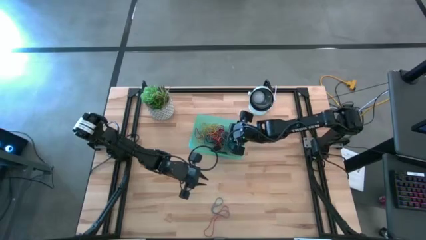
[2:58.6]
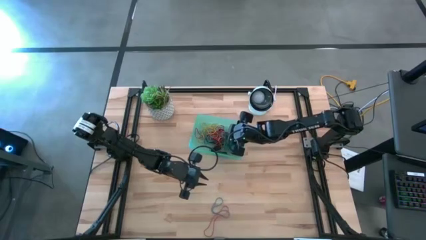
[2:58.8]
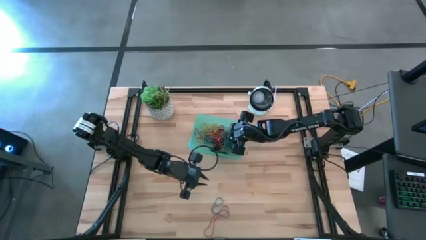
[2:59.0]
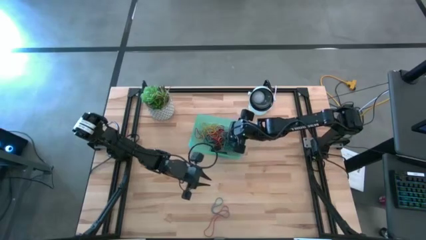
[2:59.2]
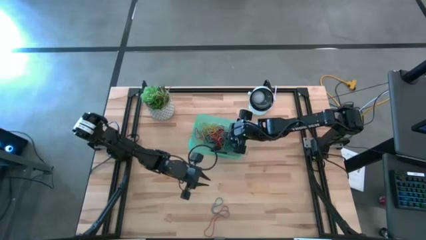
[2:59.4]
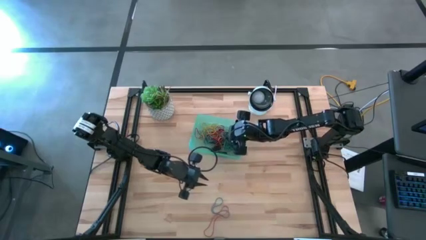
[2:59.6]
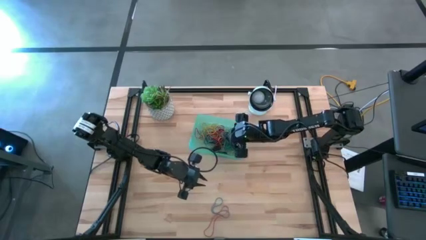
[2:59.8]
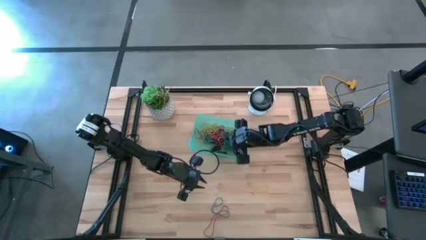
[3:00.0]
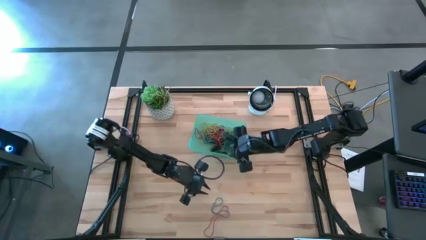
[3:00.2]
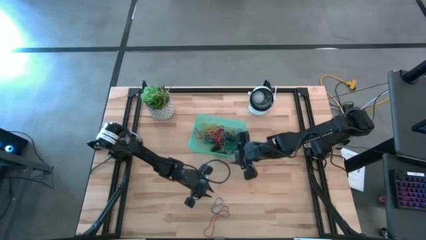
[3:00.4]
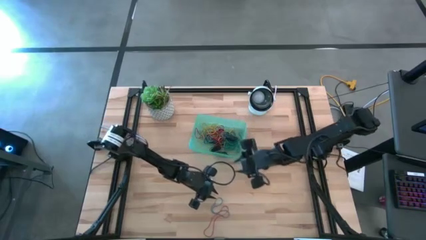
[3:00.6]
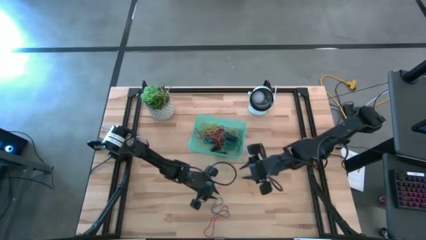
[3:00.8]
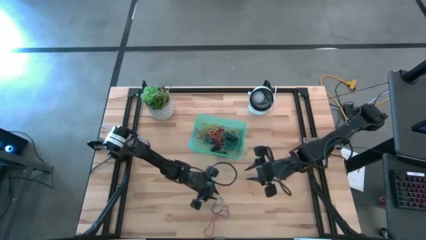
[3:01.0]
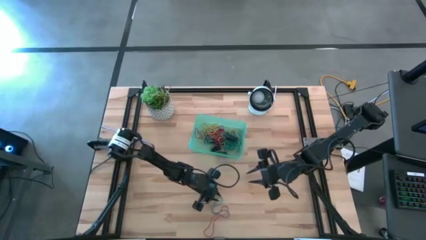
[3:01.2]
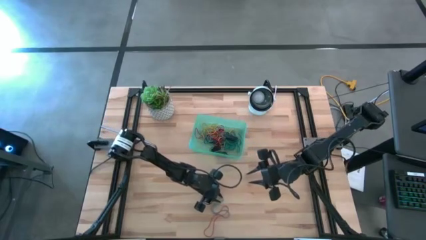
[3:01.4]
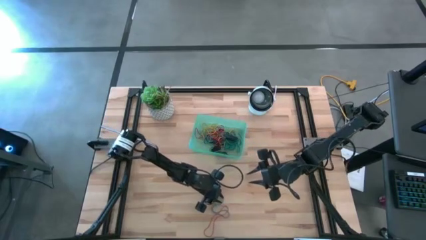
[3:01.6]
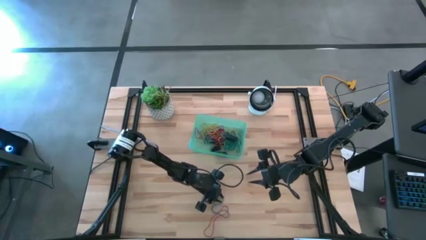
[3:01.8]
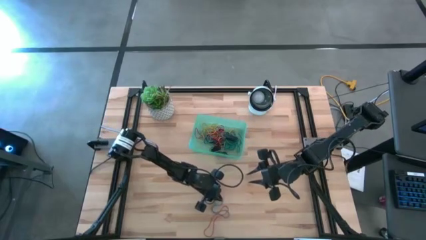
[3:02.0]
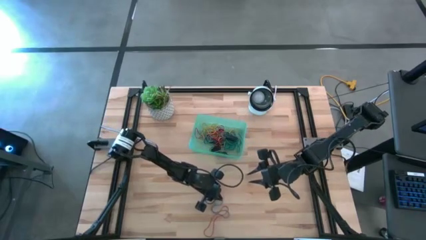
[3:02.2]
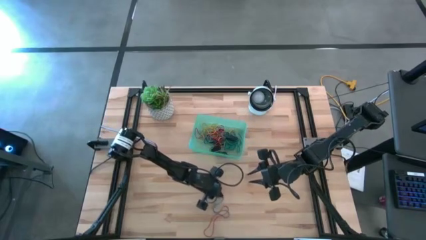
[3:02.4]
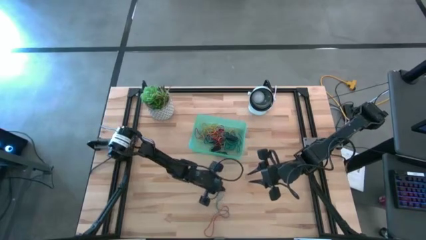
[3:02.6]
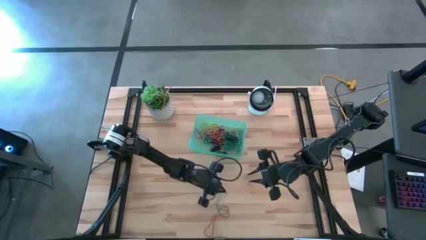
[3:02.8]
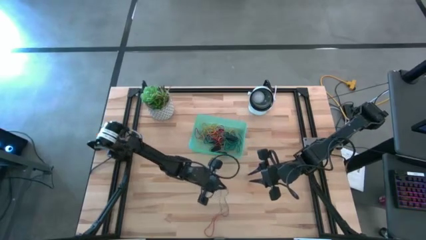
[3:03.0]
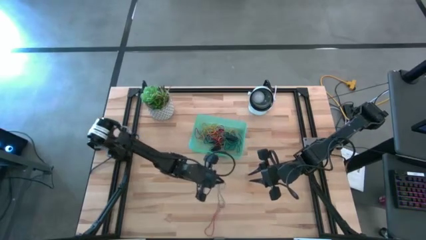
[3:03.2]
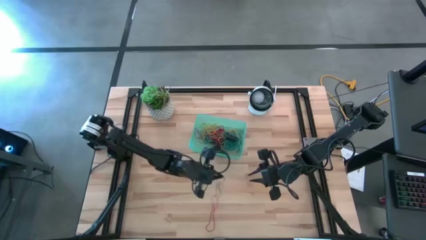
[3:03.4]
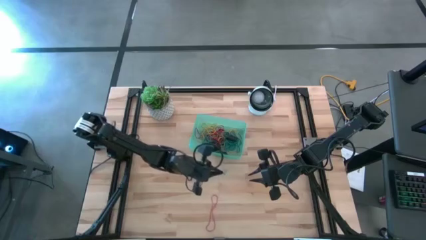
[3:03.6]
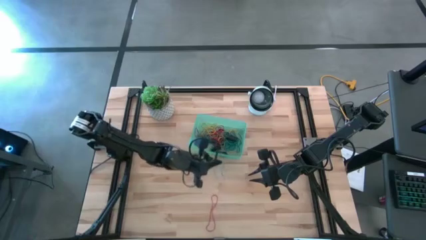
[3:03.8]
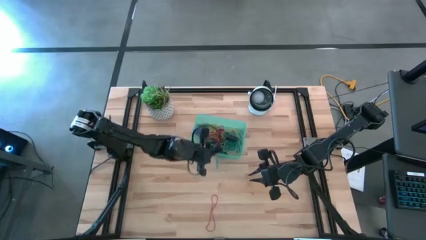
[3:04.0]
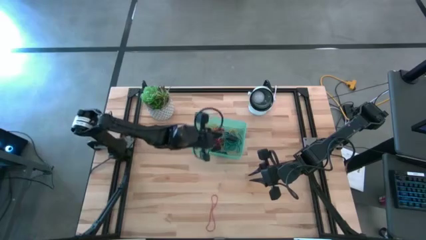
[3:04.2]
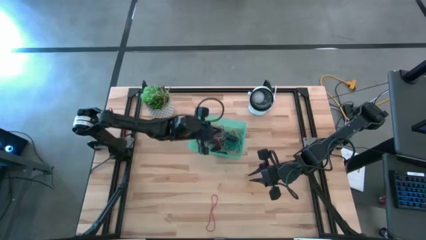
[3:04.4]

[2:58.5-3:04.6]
Task: Pick and place rubber bands into bin
Put the blue rubber band into the green bin

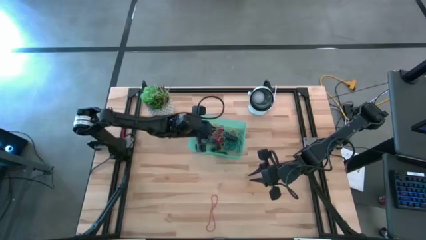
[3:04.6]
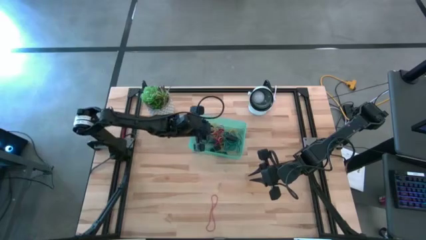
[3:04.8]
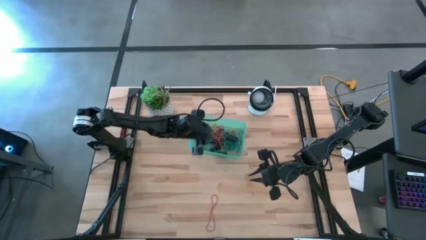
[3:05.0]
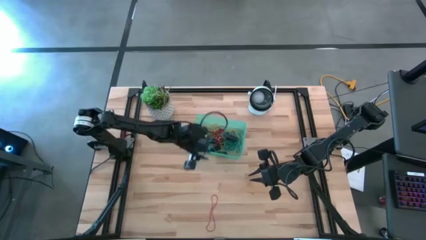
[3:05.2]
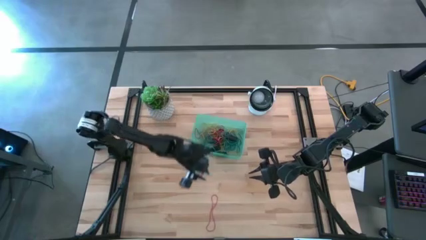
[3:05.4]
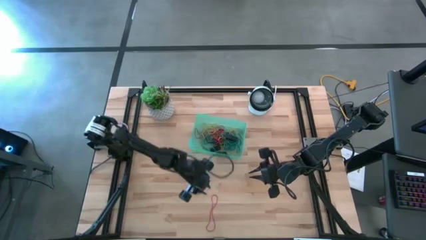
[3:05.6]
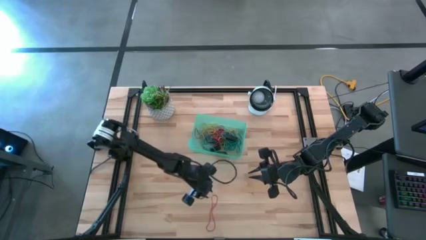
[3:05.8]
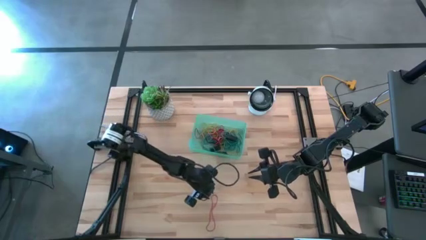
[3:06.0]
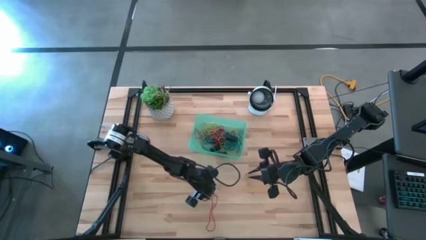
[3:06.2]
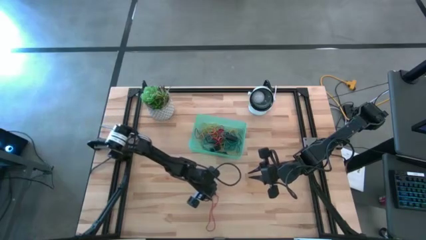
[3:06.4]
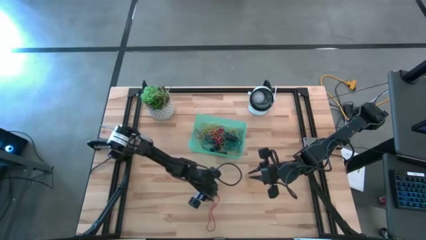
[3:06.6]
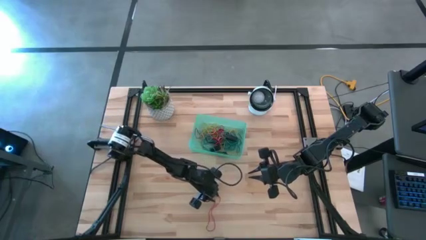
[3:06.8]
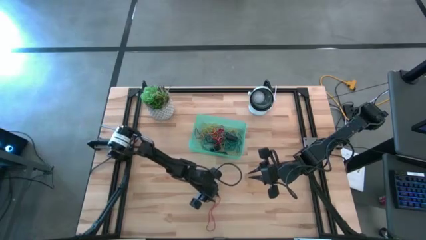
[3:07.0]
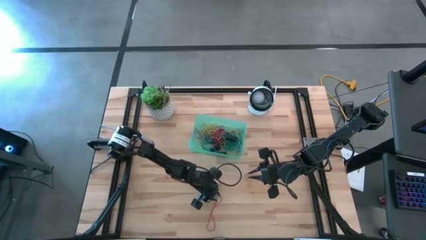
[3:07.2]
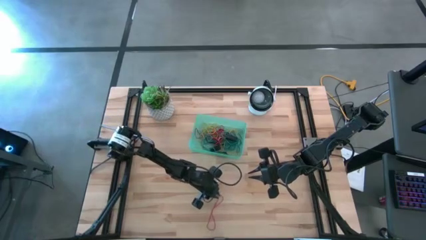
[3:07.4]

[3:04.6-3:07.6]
Put the red rubber band into the green bin

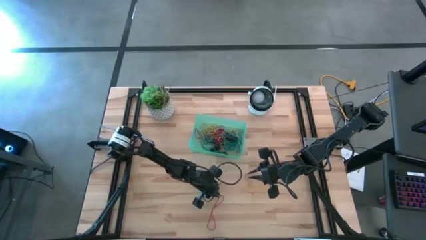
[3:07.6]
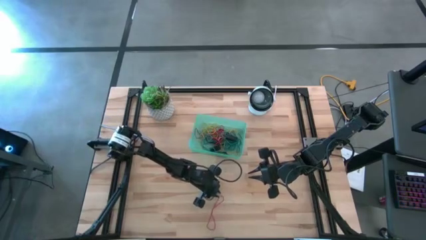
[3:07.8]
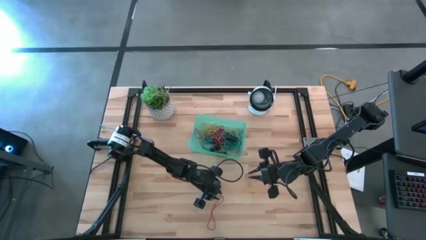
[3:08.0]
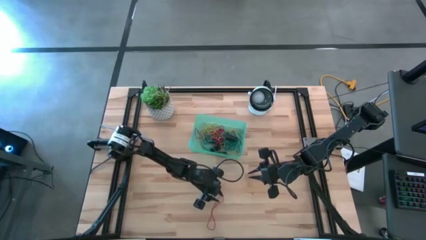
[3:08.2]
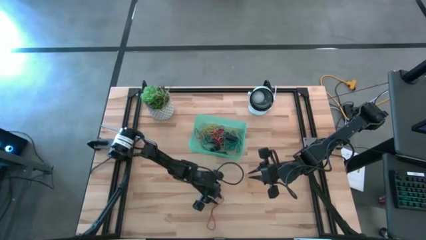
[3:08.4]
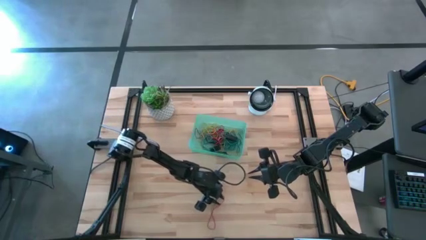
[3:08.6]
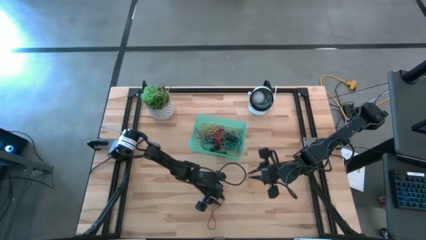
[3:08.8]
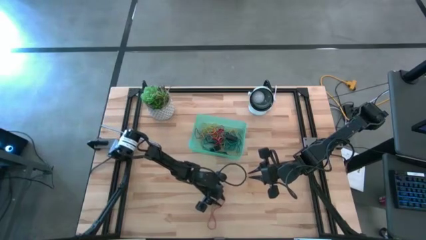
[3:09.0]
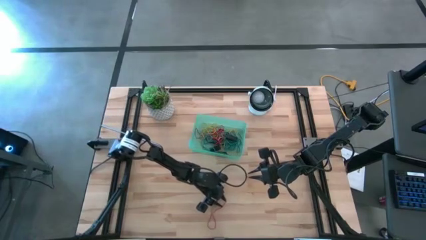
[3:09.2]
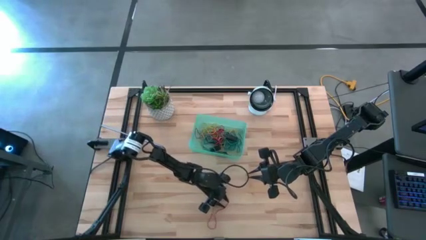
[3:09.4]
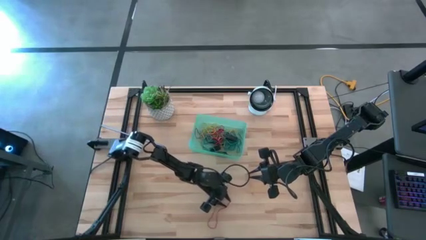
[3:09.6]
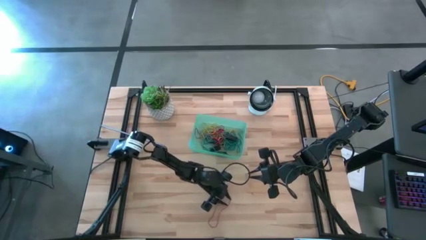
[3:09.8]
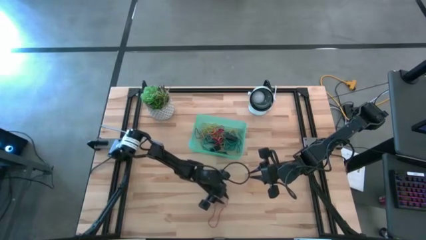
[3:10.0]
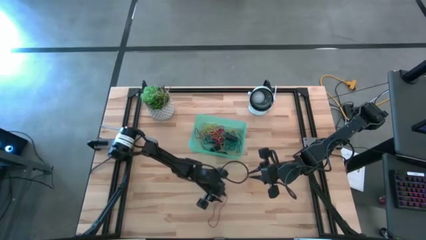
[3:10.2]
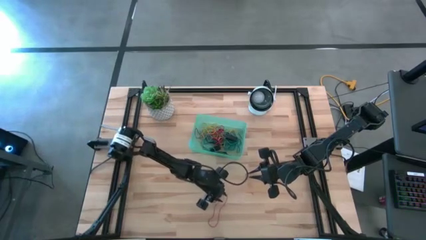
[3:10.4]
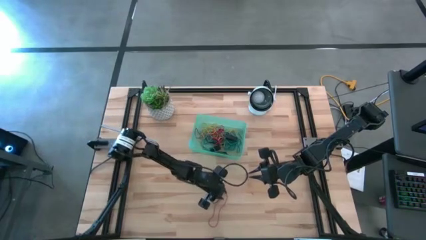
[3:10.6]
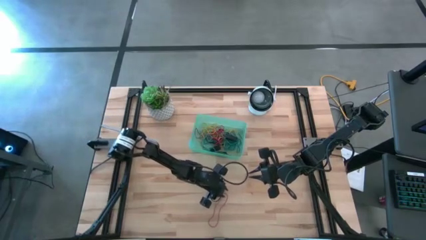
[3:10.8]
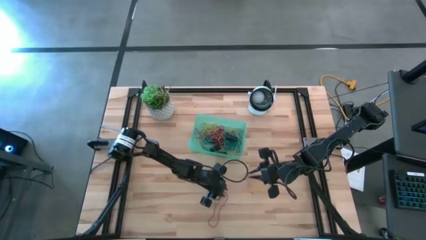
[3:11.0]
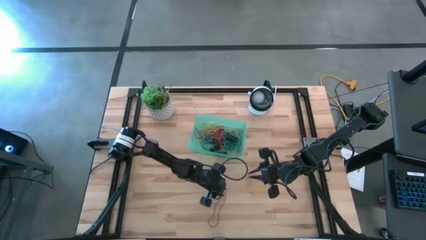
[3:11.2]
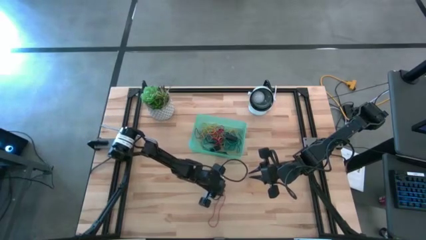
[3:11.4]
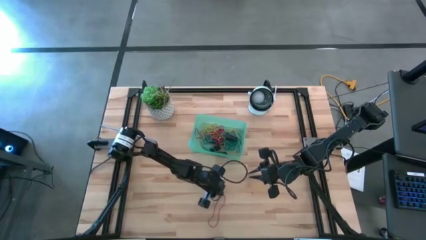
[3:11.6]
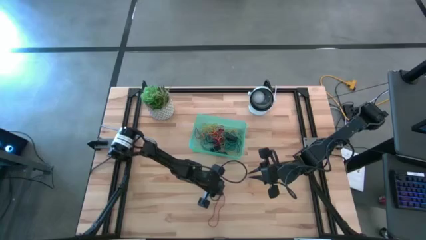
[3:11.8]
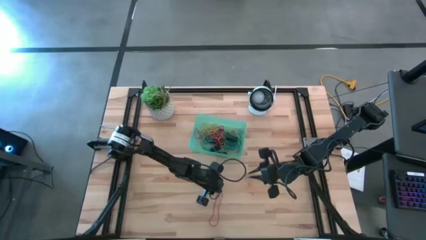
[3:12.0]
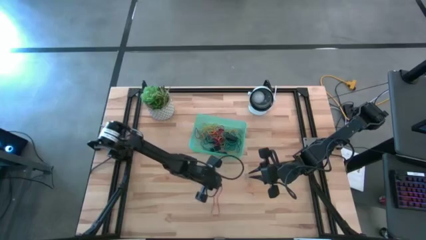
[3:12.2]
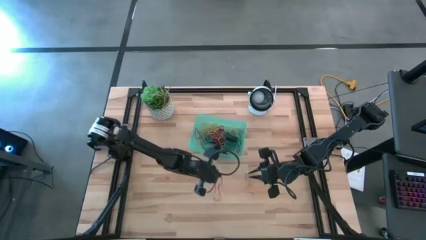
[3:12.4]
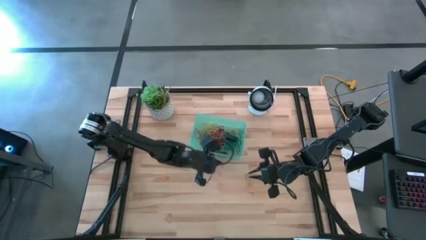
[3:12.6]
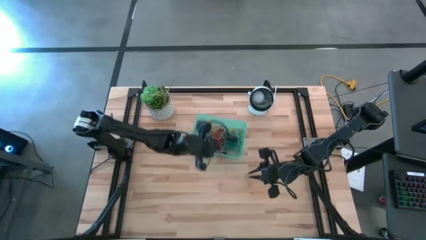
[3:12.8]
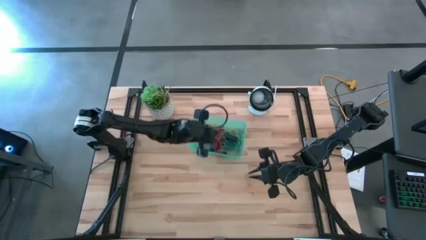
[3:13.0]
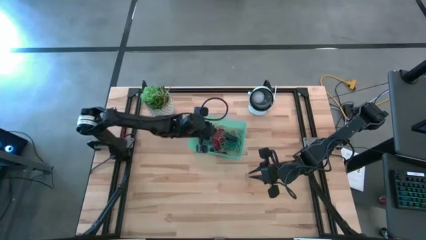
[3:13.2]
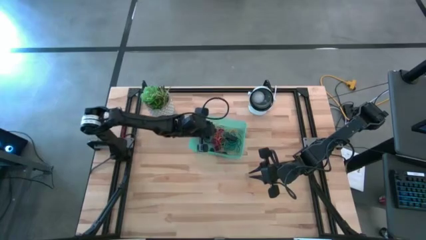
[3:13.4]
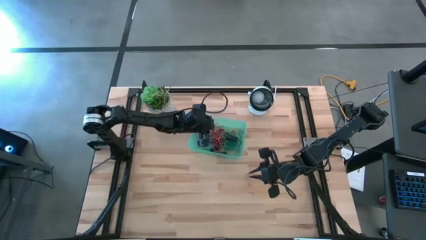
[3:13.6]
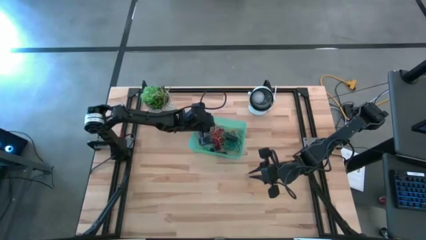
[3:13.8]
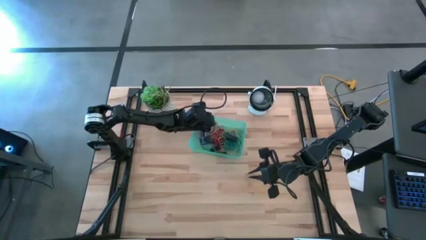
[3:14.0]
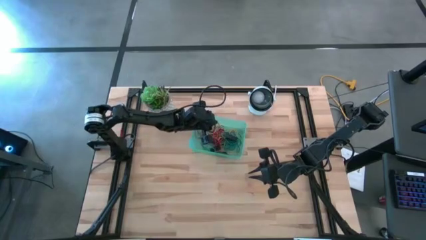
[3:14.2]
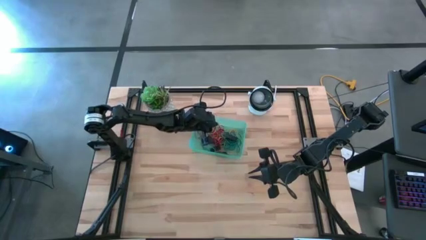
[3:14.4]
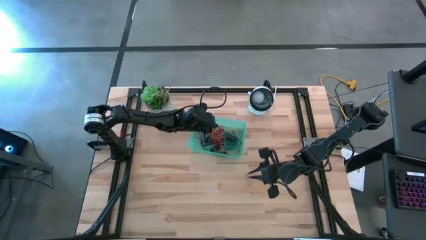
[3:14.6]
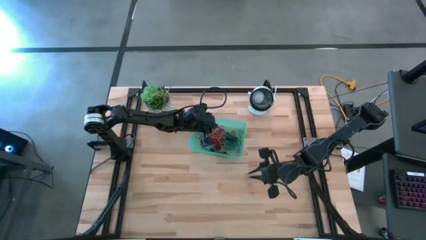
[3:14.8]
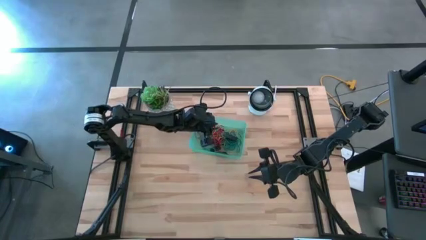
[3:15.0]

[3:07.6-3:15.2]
Put the red rubber band into the green bin
